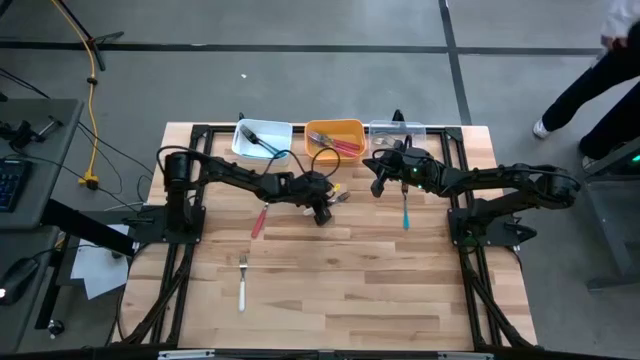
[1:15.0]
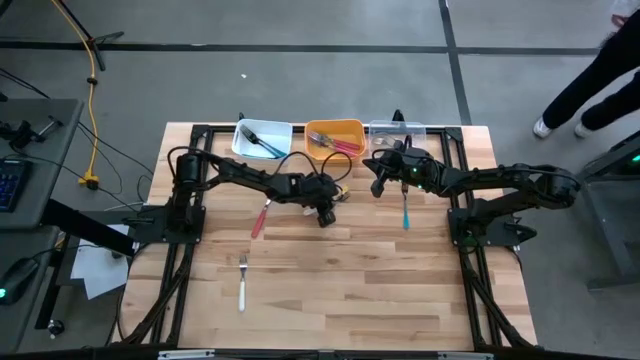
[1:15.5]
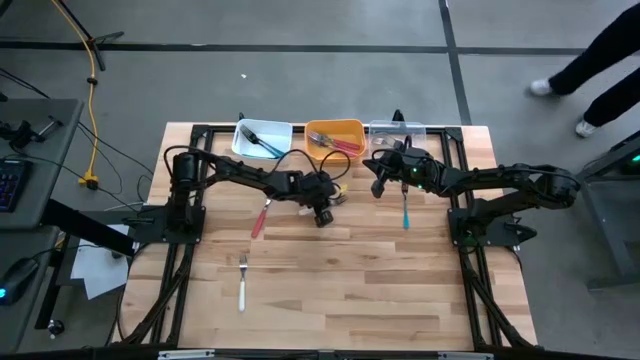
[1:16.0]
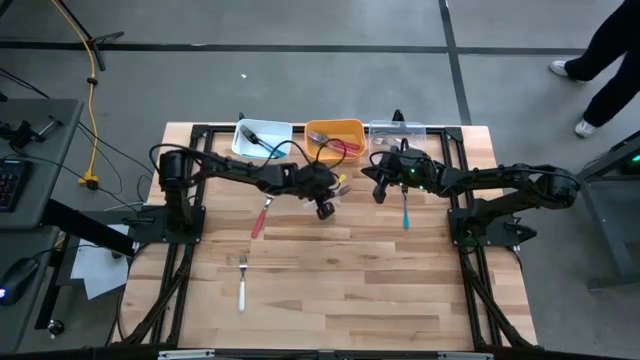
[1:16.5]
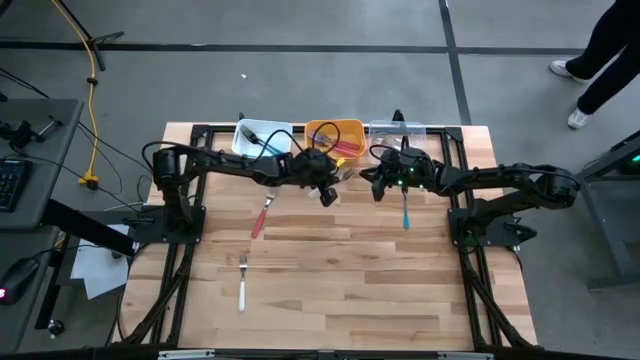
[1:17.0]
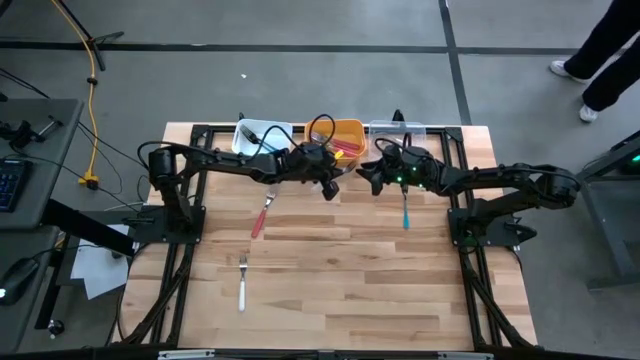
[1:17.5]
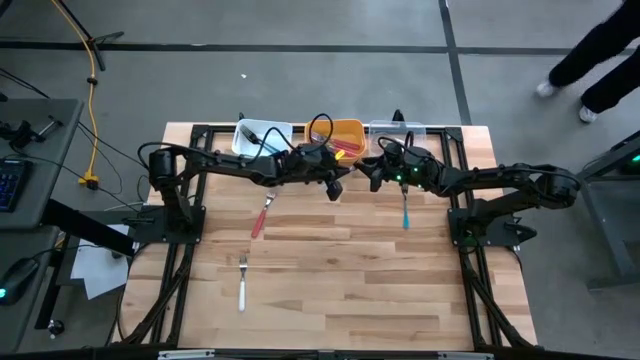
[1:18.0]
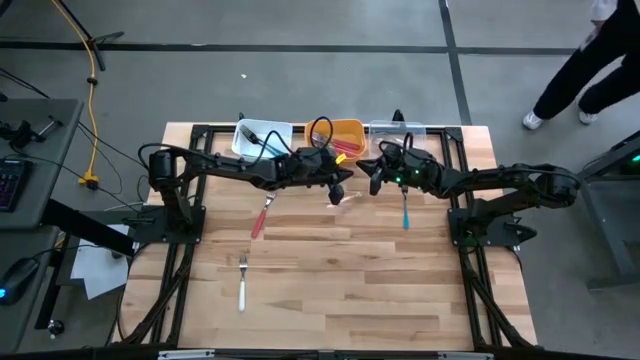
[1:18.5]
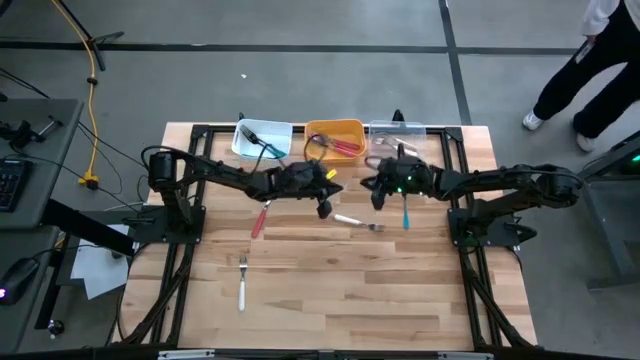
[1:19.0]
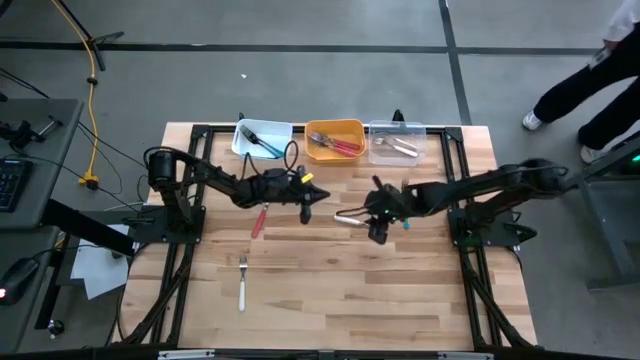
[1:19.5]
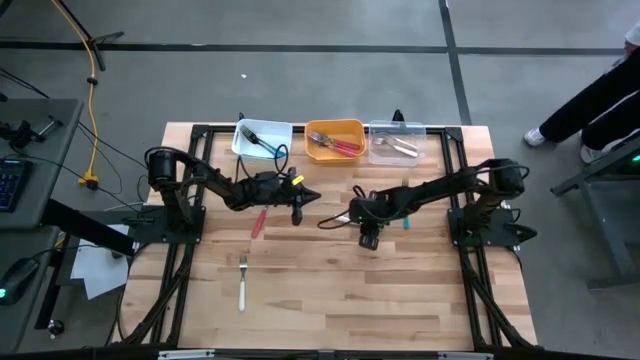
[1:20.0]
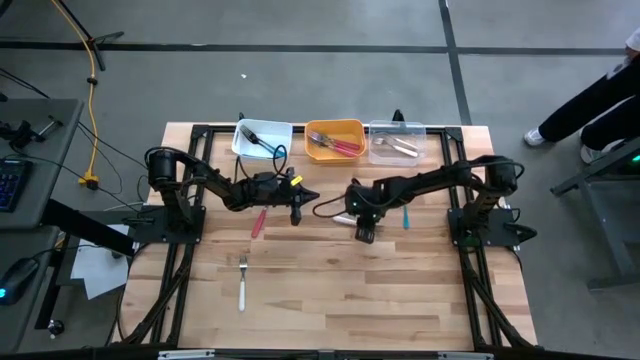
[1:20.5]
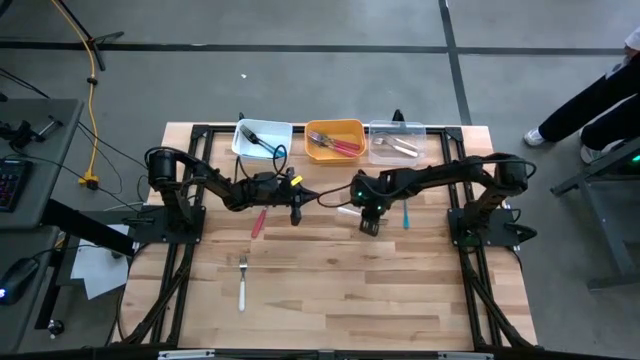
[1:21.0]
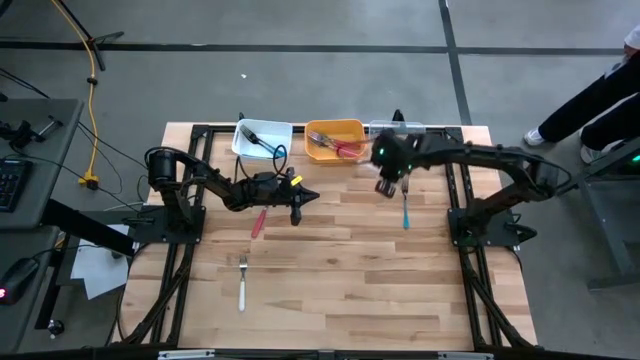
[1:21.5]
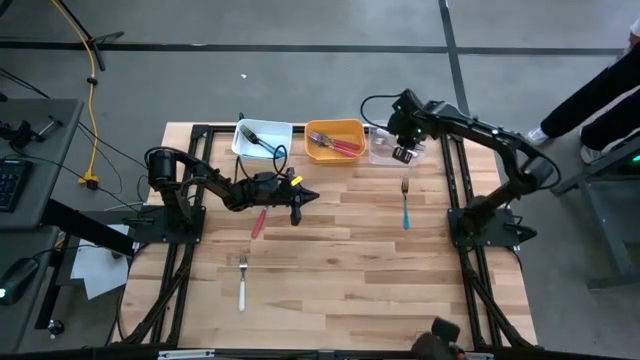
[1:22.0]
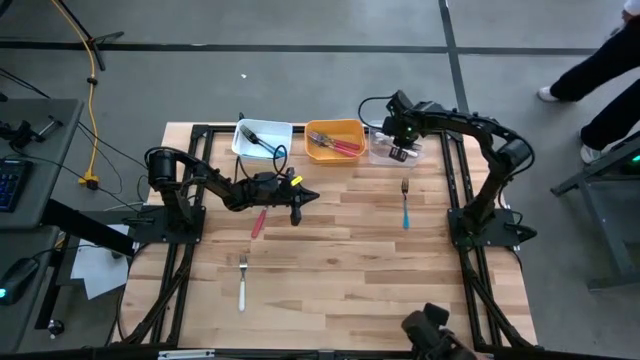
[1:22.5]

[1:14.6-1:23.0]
Task: Sort silverware by color (type)
Put the top white fork into the transparent bin

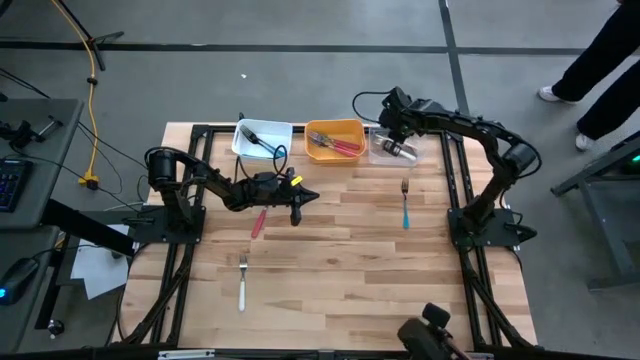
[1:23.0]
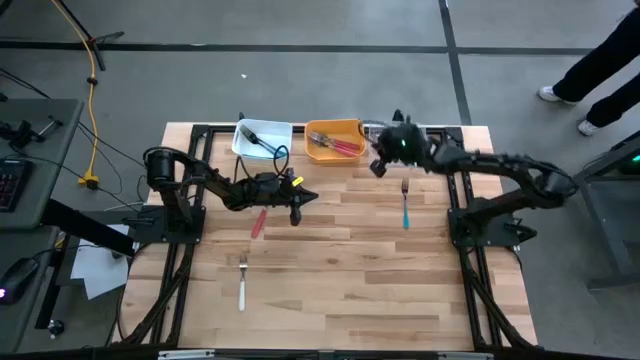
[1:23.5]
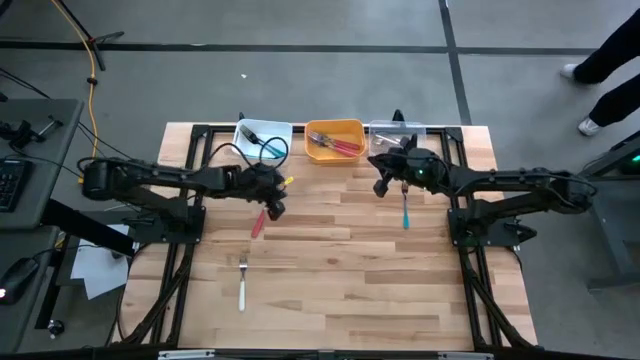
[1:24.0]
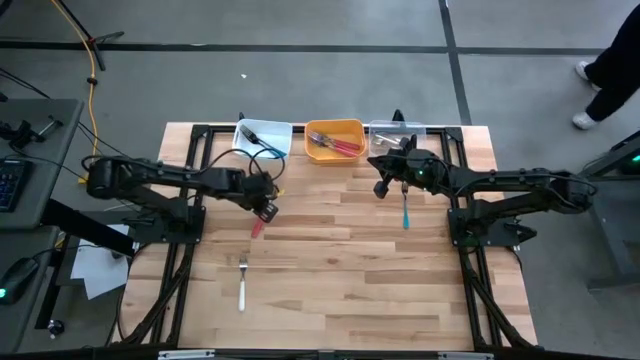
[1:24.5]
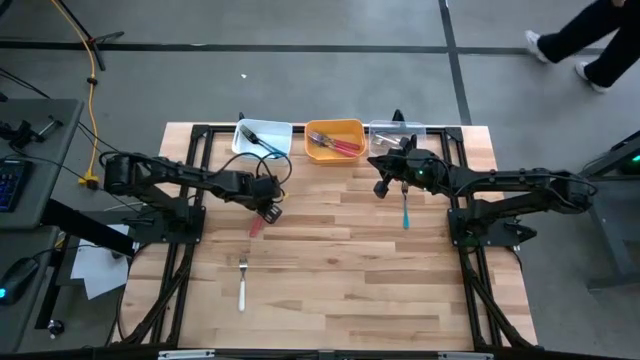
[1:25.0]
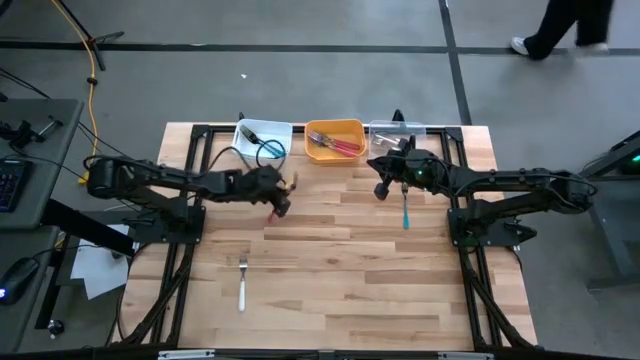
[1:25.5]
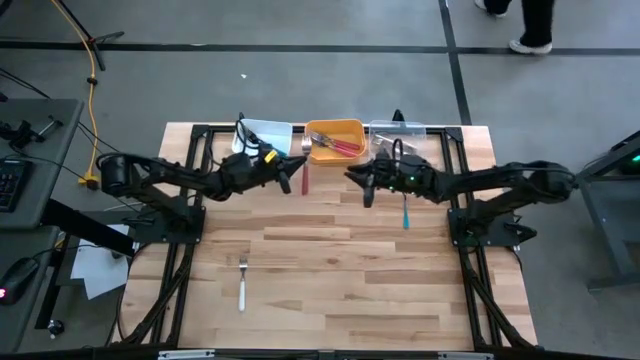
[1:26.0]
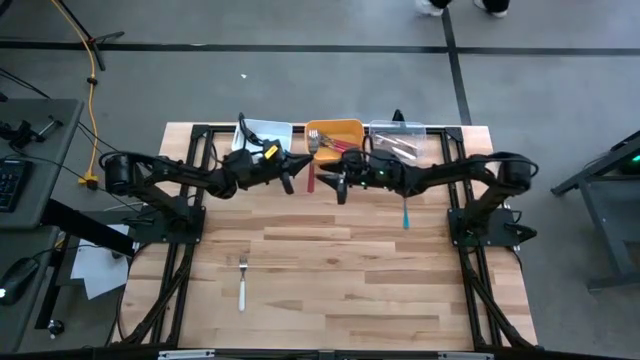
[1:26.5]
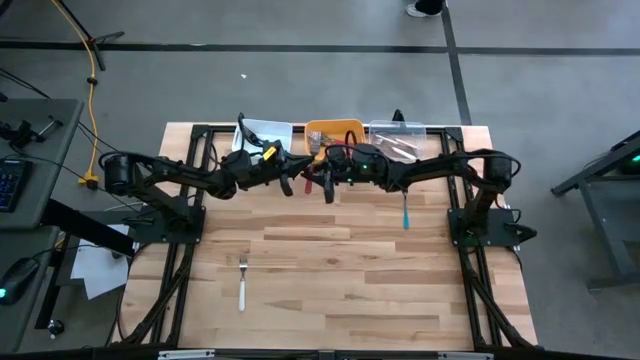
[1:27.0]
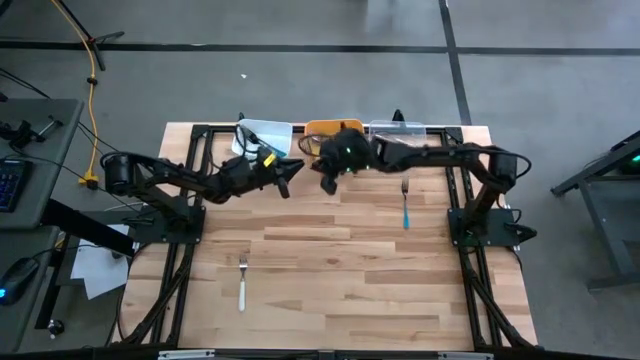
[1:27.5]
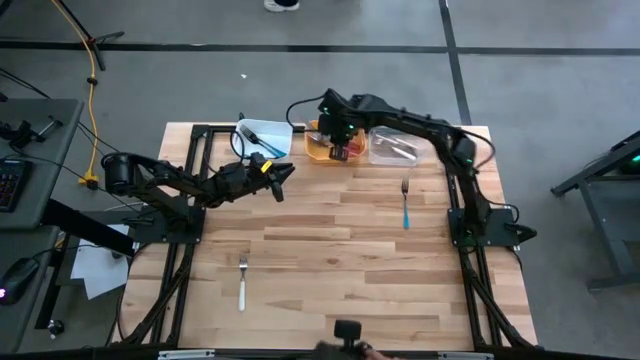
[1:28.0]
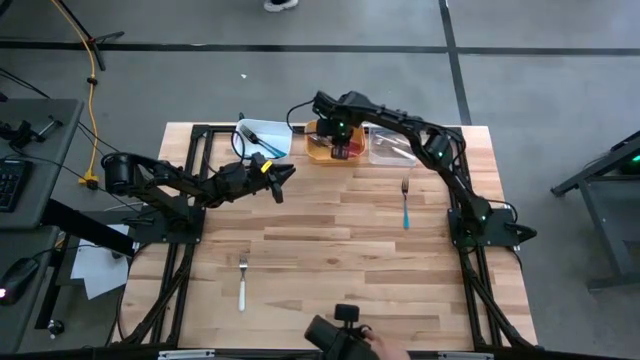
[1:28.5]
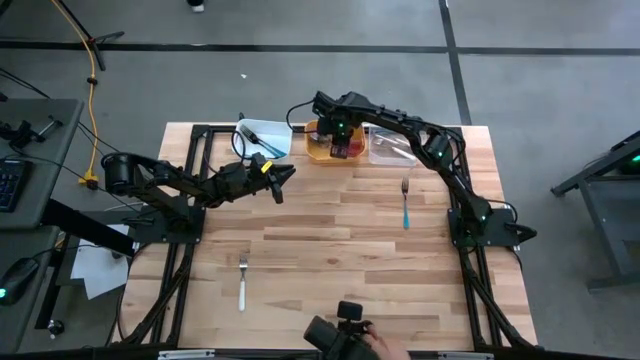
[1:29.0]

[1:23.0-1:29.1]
Put the pink fork into the yellow bin

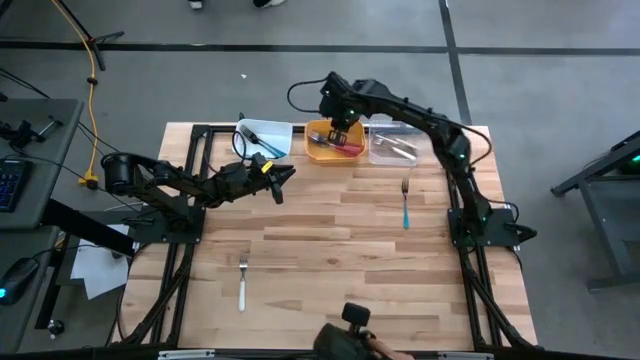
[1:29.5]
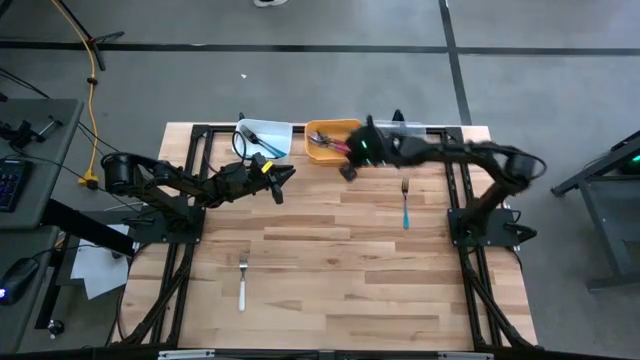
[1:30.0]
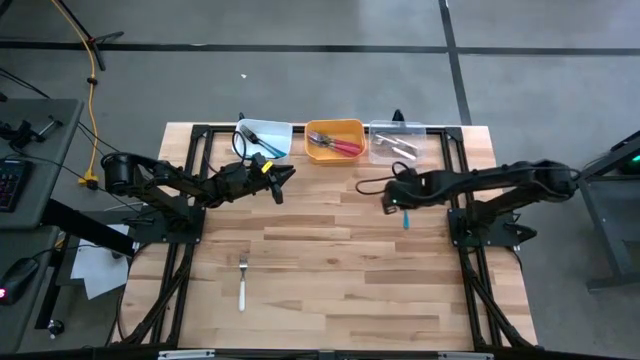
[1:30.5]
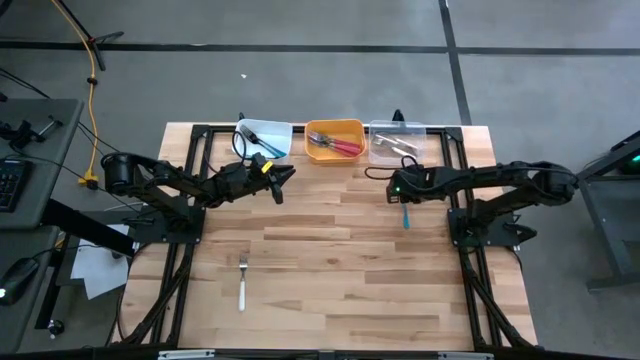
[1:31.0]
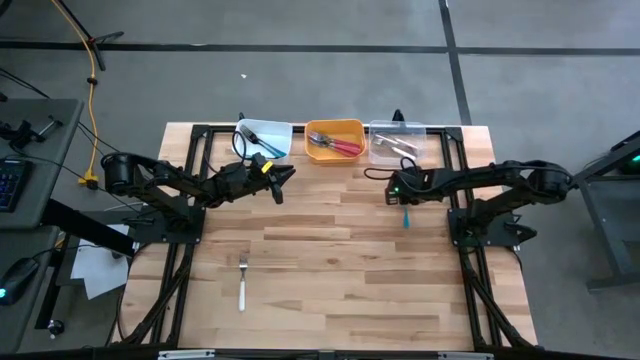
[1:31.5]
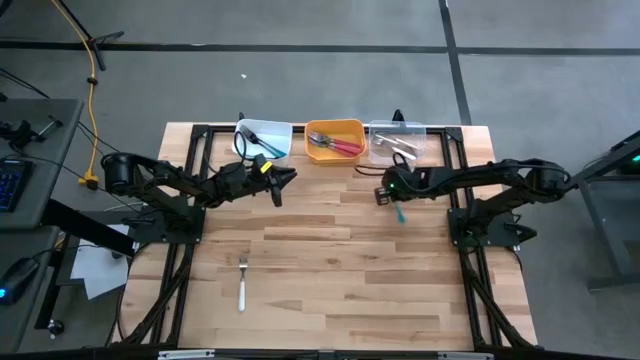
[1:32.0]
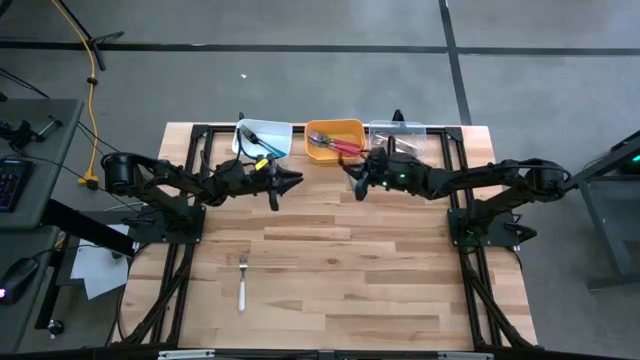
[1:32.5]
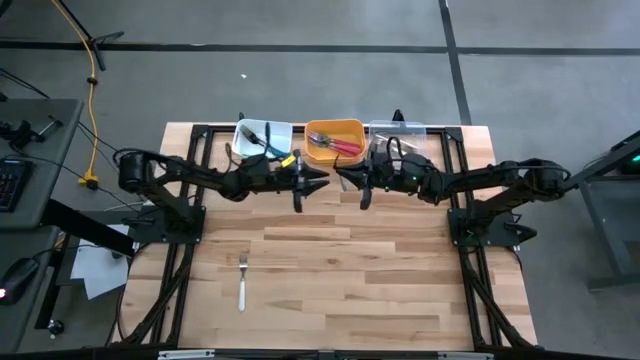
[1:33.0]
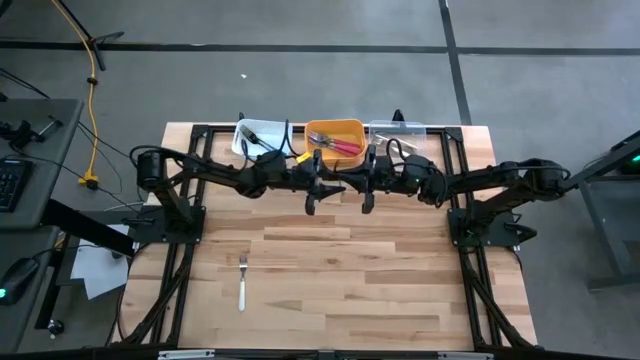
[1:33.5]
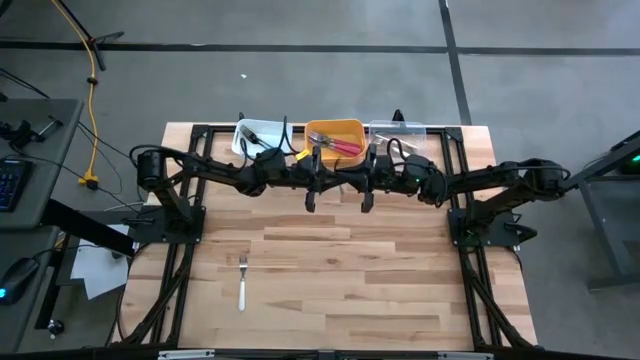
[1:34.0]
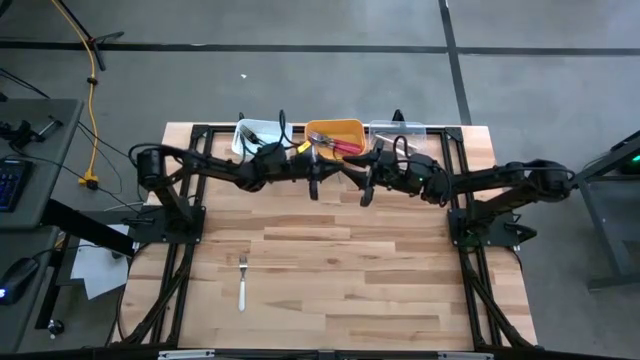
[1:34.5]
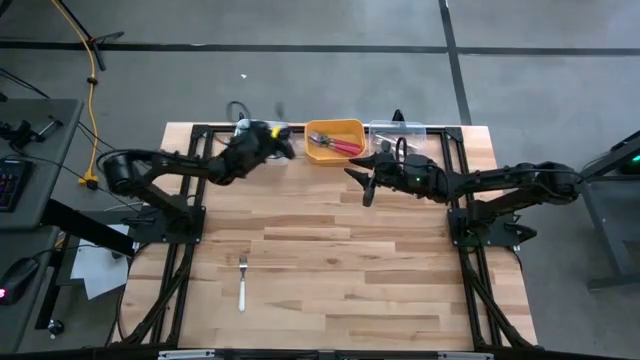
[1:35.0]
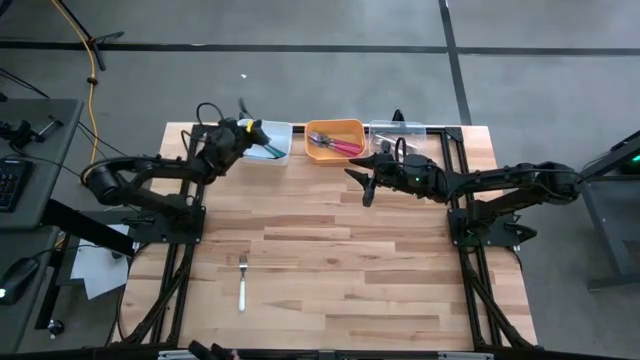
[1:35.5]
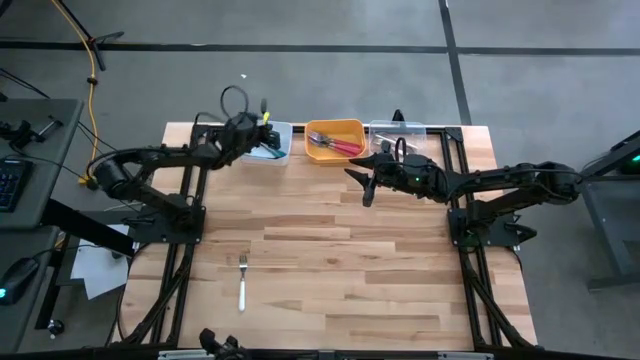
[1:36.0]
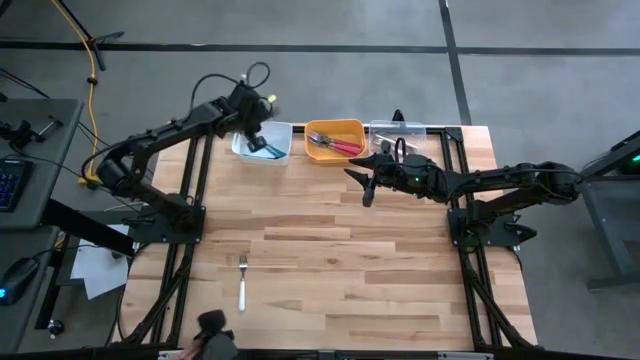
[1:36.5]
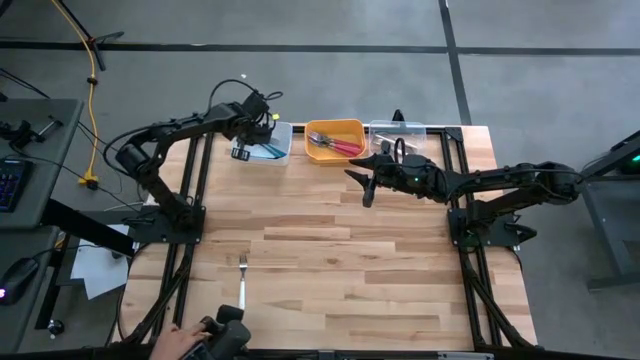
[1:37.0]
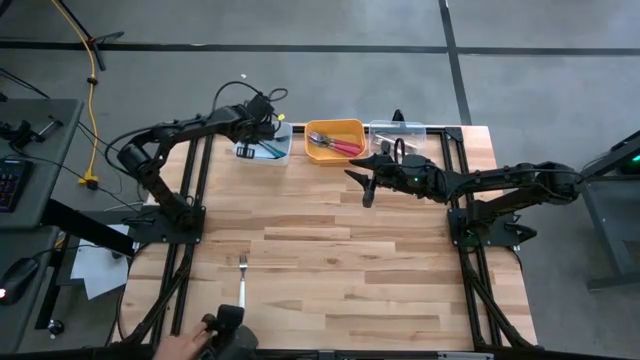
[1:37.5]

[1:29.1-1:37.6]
Put the blue fork into the white bin
